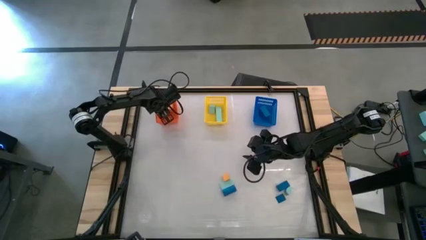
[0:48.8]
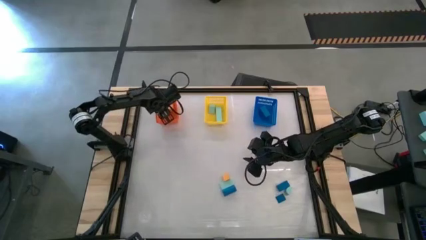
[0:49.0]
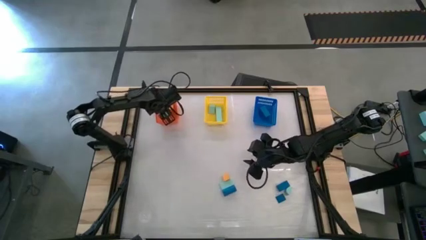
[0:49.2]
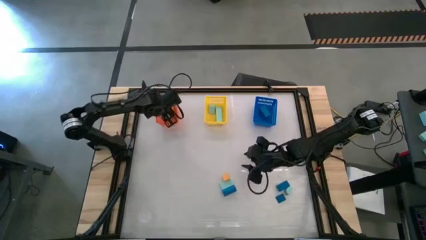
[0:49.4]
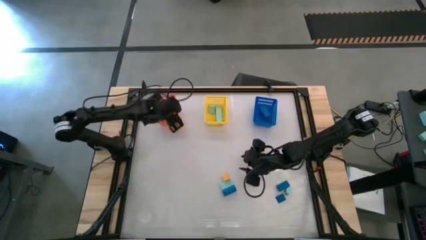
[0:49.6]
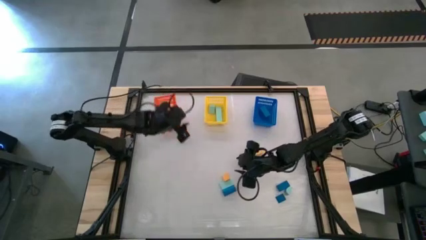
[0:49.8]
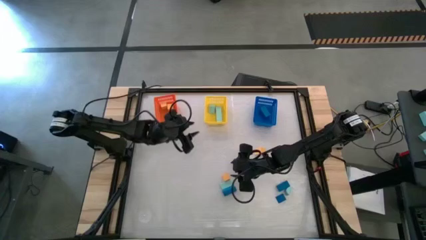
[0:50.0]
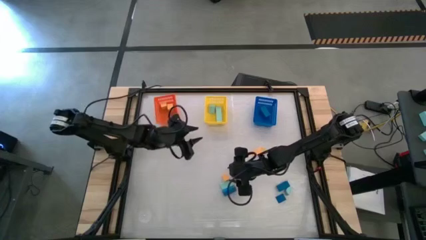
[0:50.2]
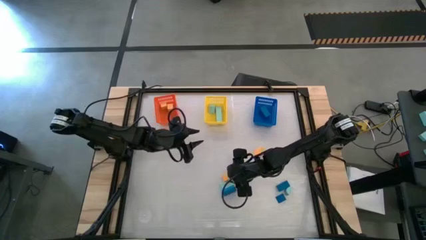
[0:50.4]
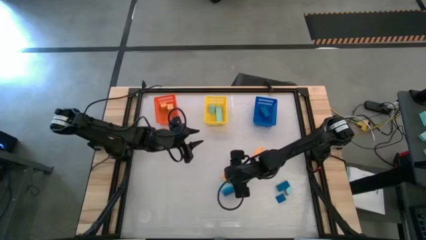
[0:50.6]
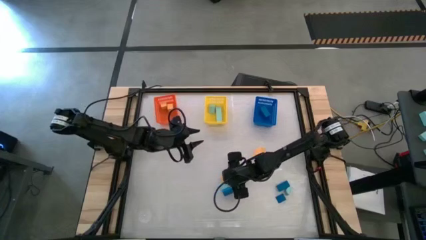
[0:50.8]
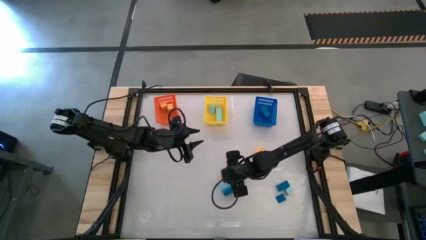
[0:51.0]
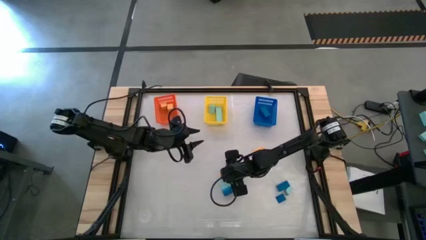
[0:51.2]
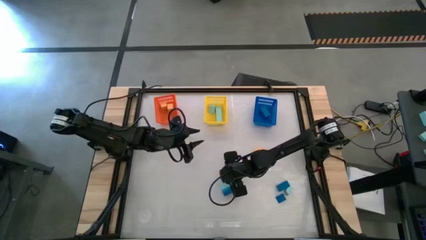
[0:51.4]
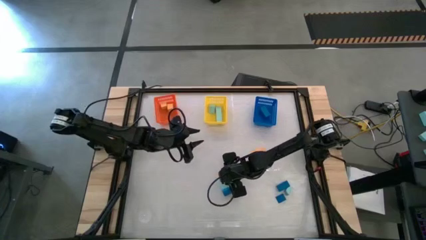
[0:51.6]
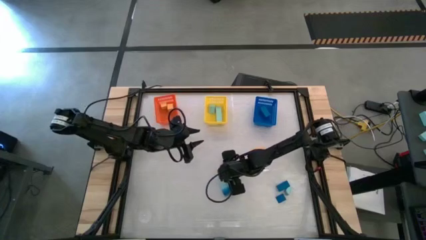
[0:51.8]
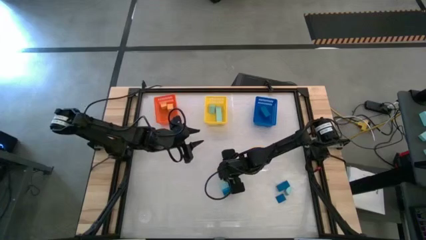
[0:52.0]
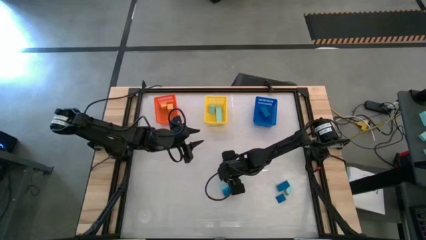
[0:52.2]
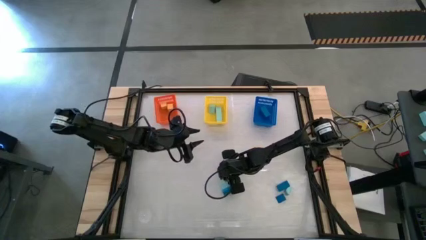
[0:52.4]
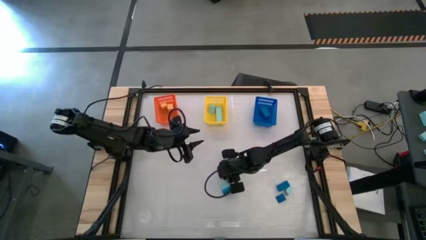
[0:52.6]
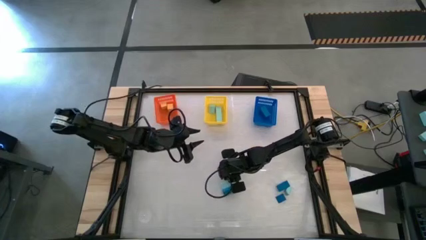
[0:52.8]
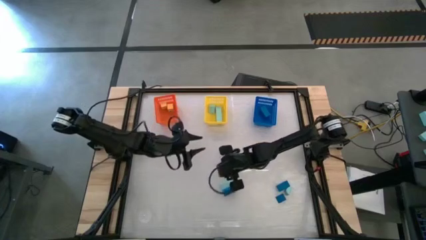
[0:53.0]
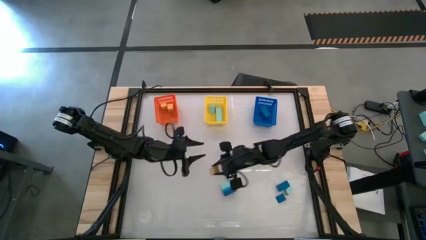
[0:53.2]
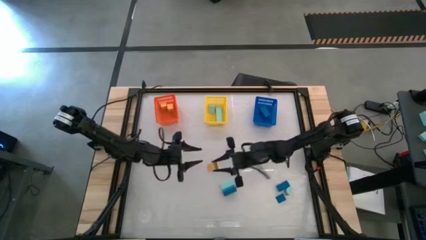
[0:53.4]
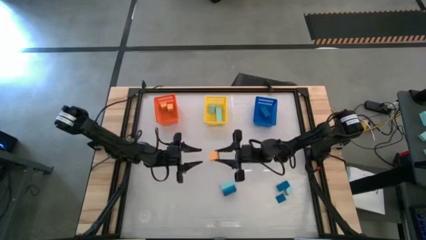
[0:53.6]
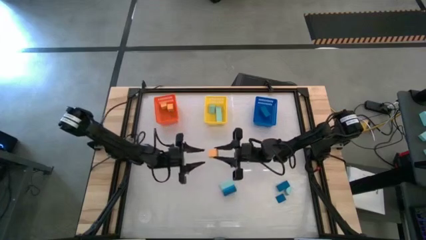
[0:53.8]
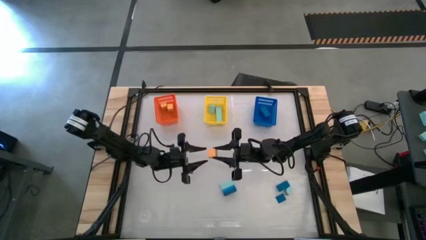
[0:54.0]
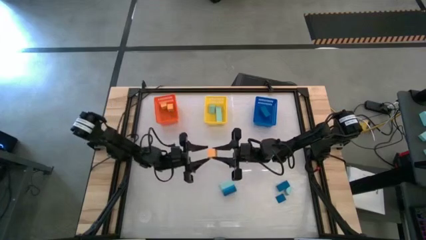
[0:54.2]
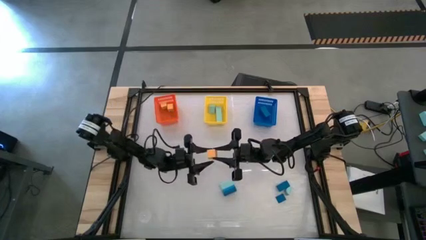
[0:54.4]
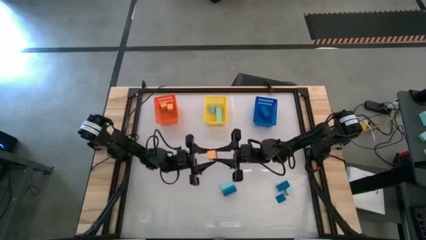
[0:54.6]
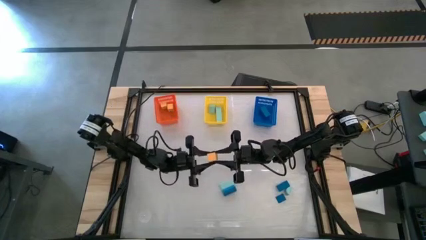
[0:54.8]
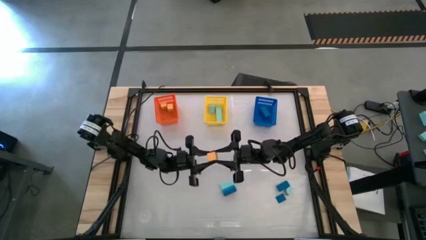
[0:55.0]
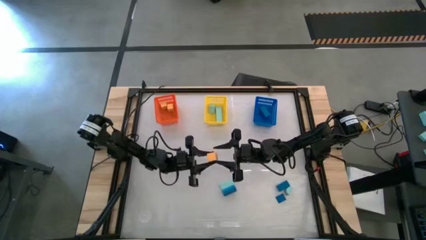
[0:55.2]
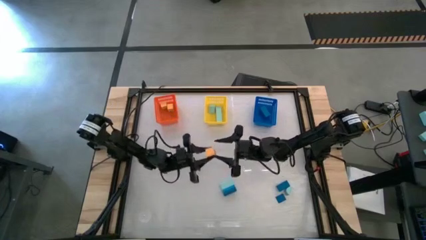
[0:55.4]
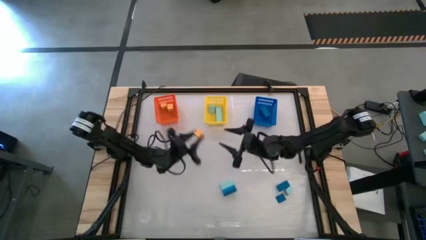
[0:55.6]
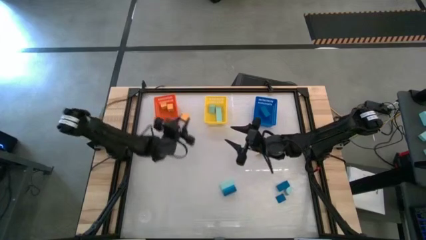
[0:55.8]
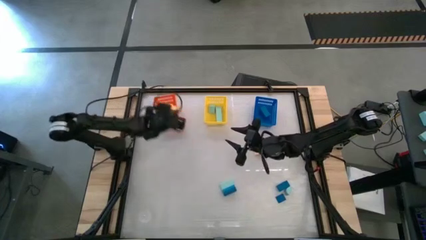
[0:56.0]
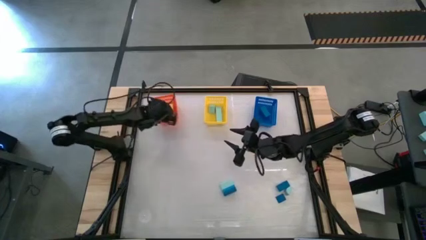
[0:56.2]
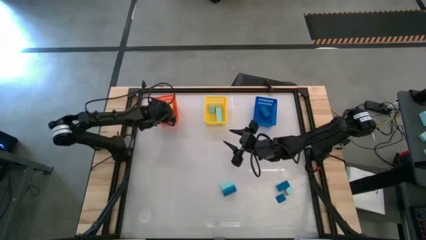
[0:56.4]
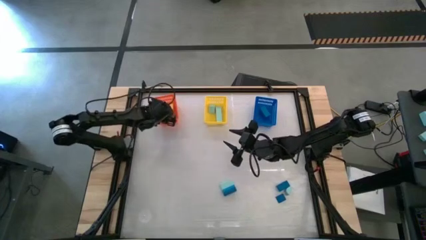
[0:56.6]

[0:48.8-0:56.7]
Task: Sort & place blocks by color
Put the yellow block into the orange bin

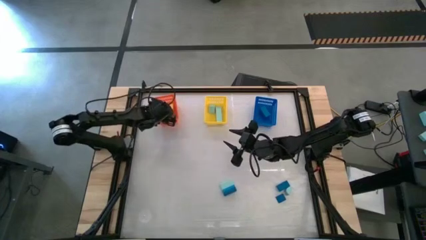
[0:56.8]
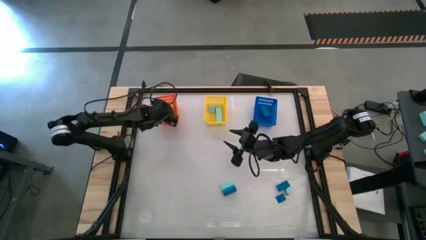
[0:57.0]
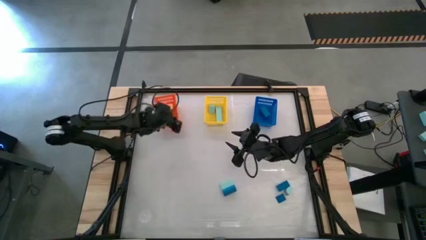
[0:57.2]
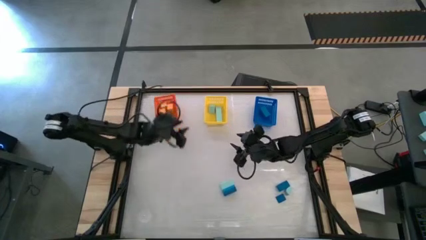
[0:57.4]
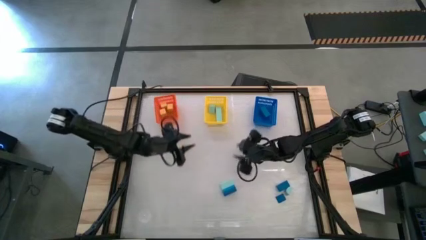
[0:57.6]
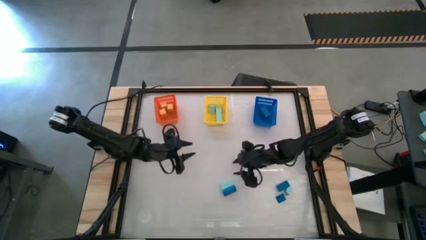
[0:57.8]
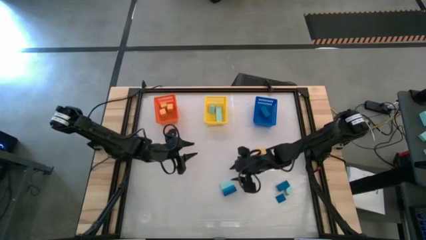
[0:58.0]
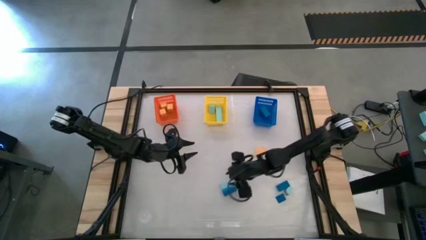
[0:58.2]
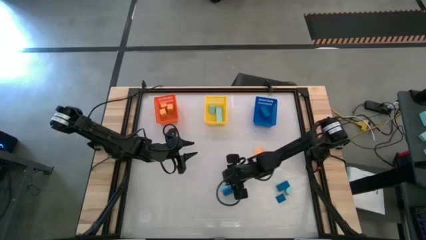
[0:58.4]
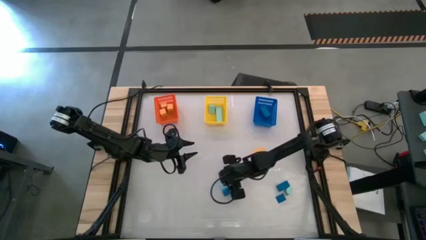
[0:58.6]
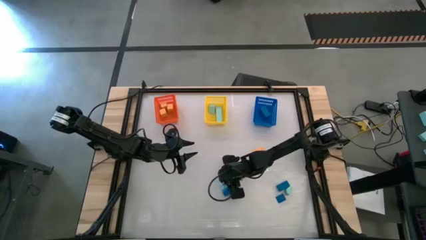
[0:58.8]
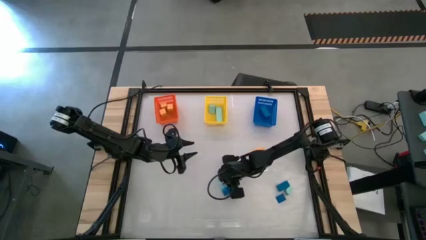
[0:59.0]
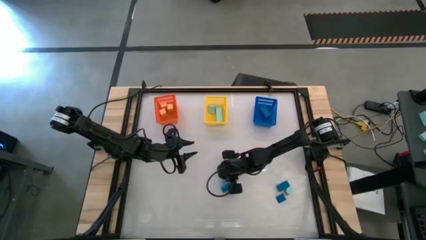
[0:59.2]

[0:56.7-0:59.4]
Put the light blue block into the yellow bin

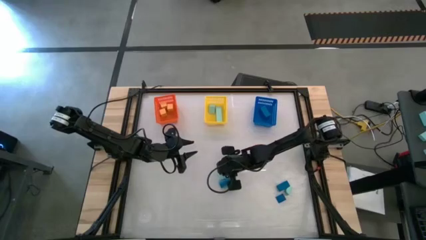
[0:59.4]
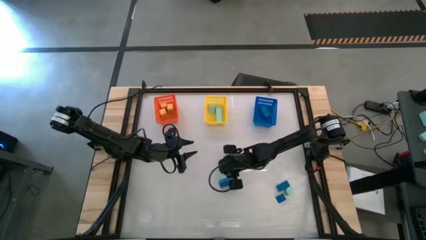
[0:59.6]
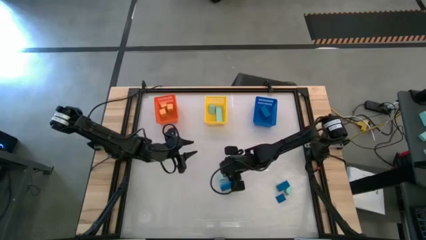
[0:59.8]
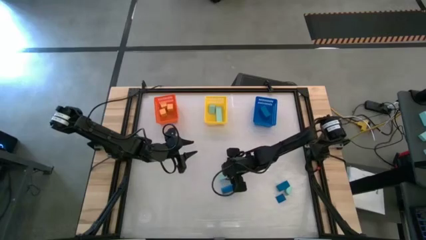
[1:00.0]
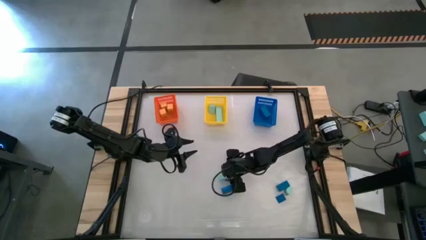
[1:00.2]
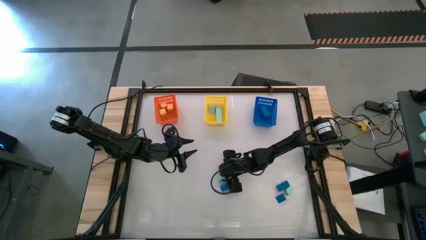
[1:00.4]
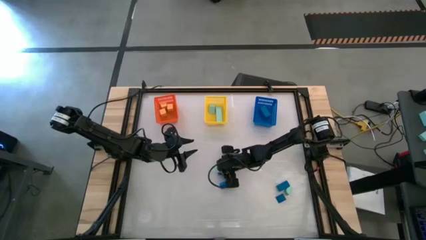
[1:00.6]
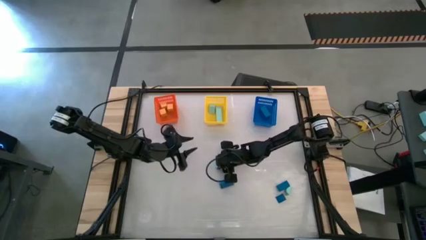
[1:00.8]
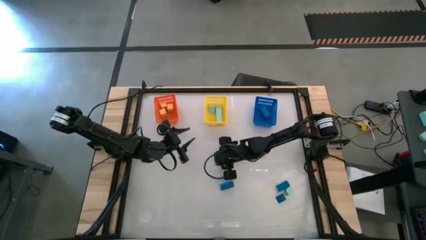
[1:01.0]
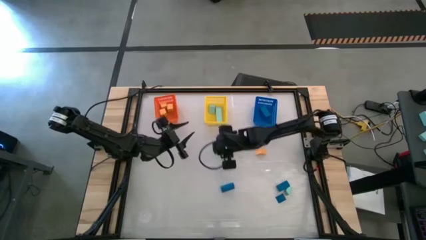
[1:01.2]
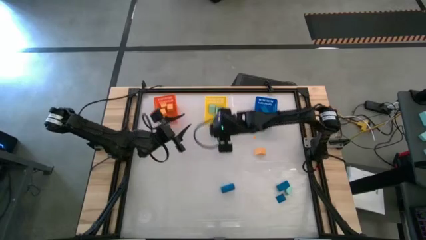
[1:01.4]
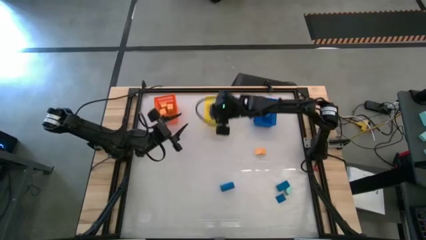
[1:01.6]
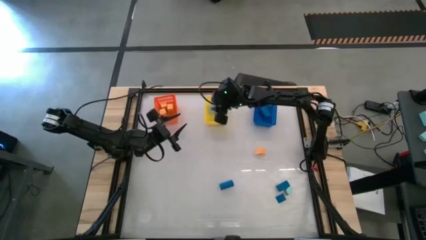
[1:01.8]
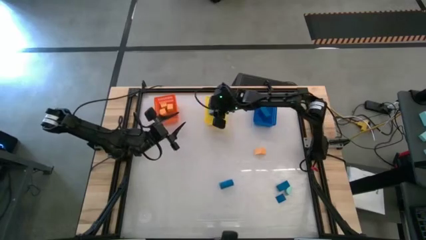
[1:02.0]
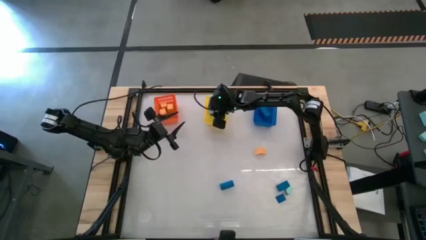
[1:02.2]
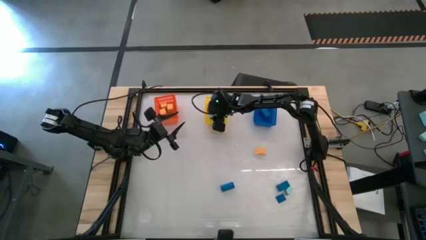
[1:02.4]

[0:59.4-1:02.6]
Put the light blue block into the yellow bin

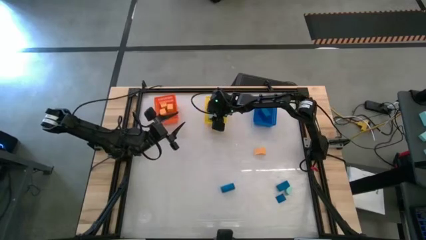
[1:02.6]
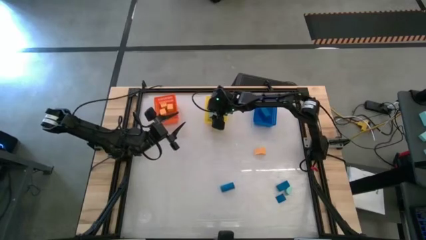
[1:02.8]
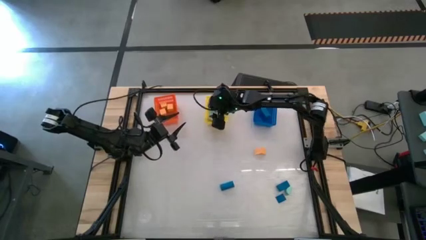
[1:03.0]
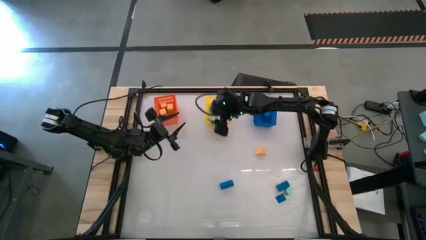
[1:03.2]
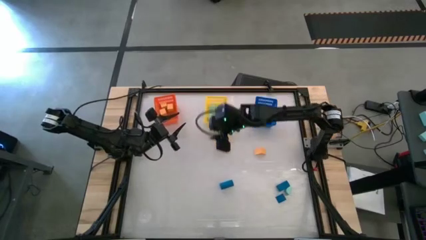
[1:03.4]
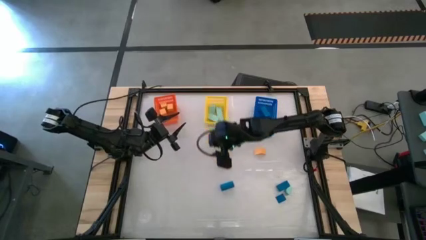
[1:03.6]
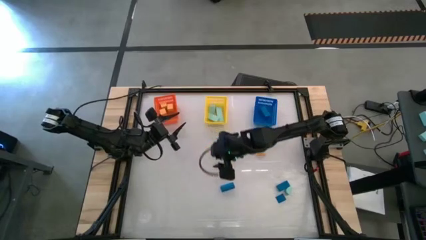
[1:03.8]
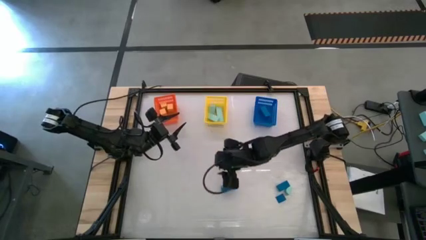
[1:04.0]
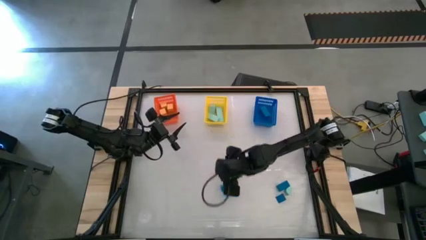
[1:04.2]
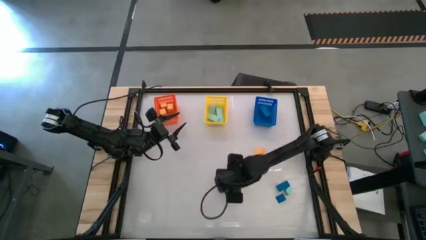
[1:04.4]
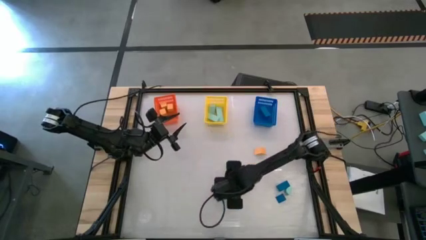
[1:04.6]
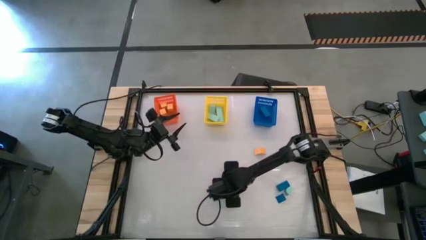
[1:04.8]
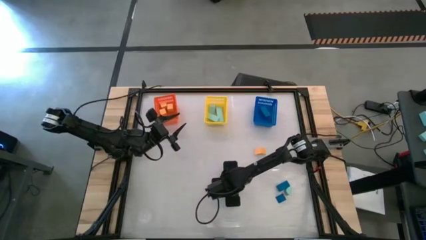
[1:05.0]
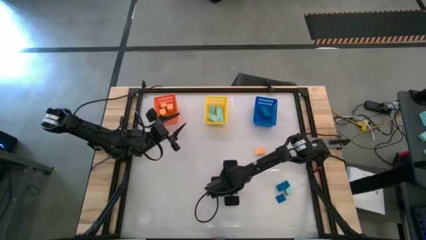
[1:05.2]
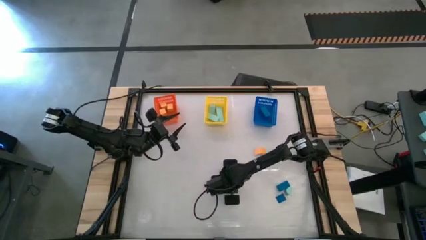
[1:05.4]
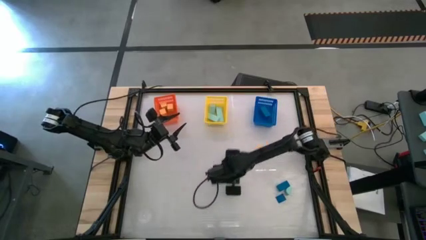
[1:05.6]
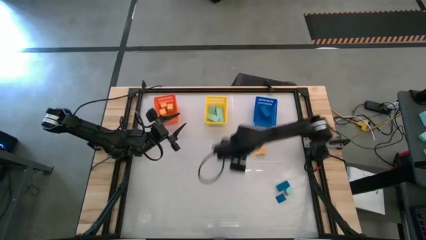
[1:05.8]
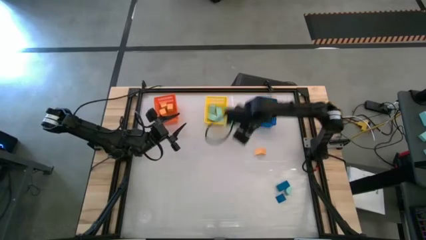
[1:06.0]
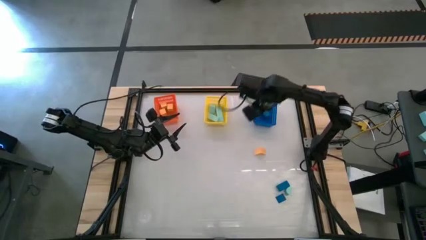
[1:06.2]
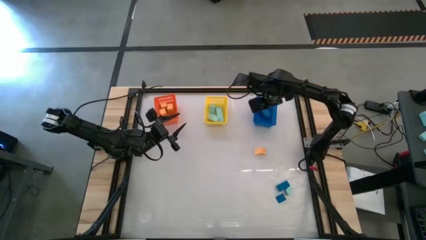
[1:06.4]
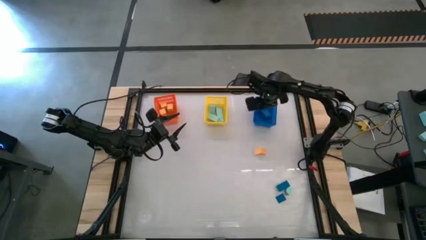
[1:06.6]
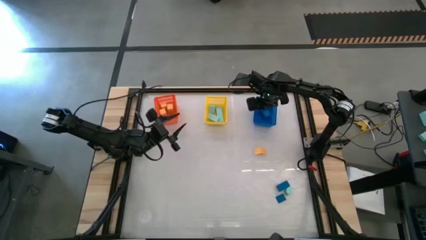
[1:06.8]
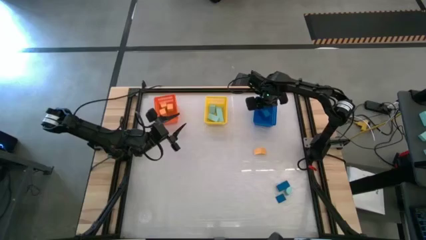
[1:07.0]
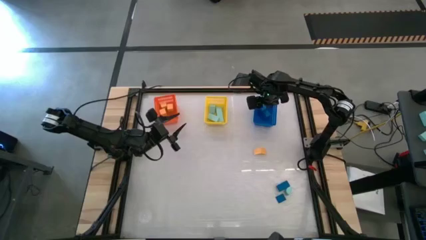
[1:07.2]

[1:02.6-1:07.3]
Put the blue block into the blue bin
